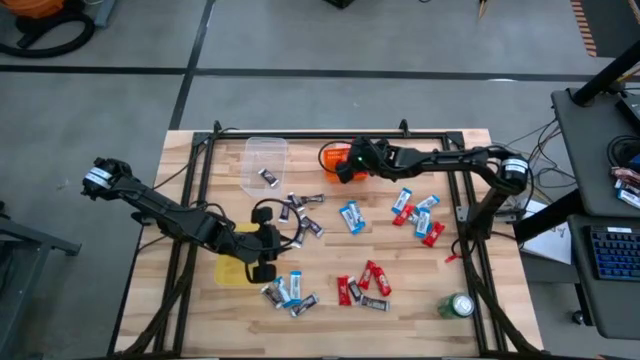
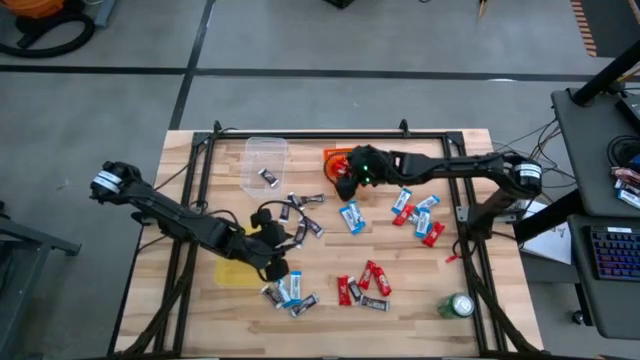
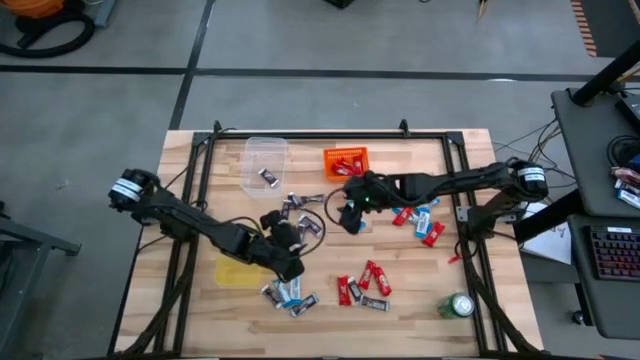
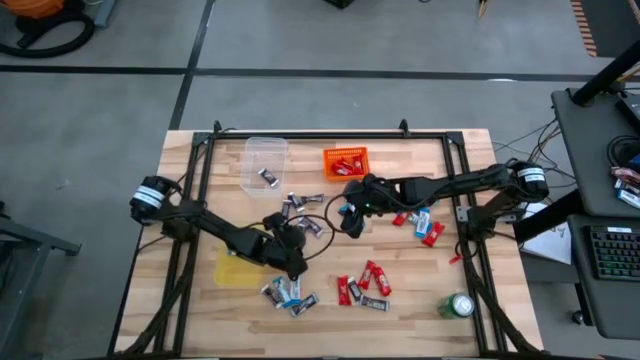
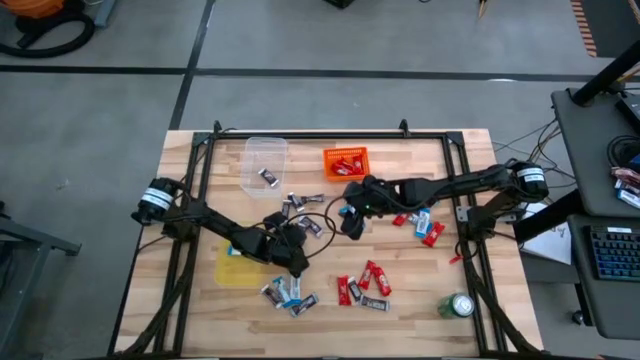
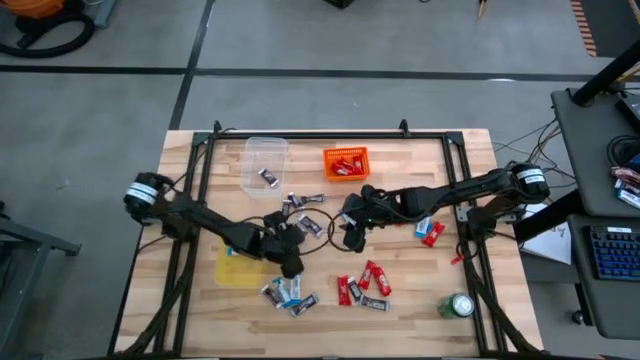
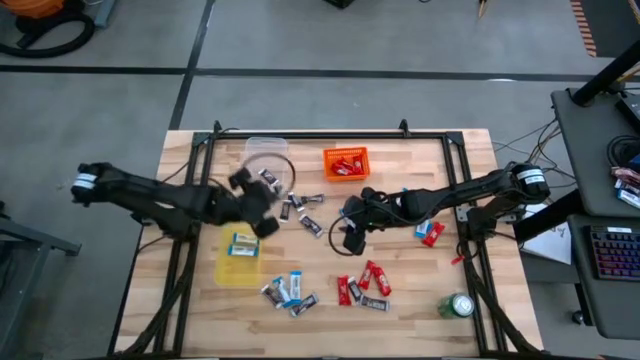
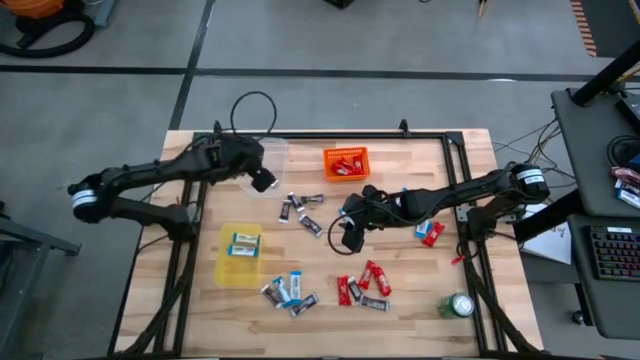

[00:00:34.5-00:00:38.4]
Task: Sort candy
Put the middle left brown candy into the transparent bin

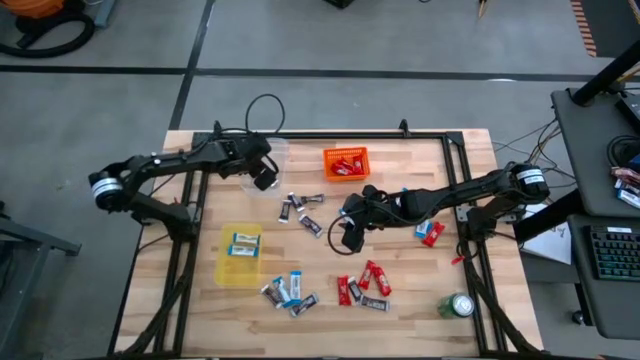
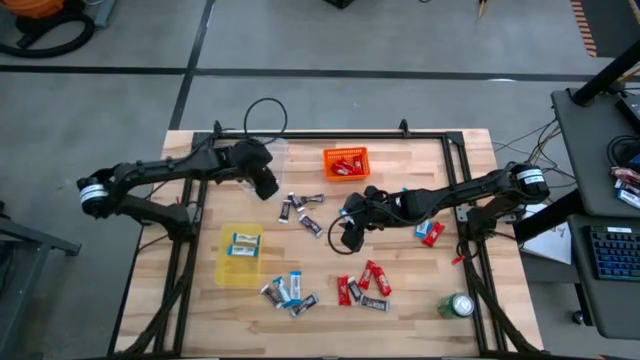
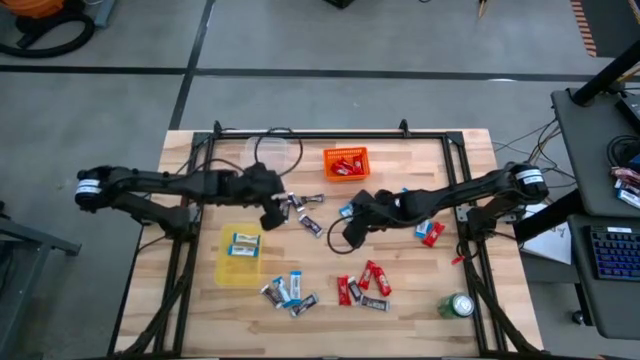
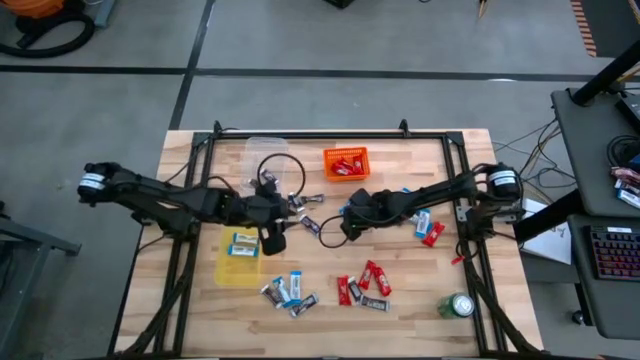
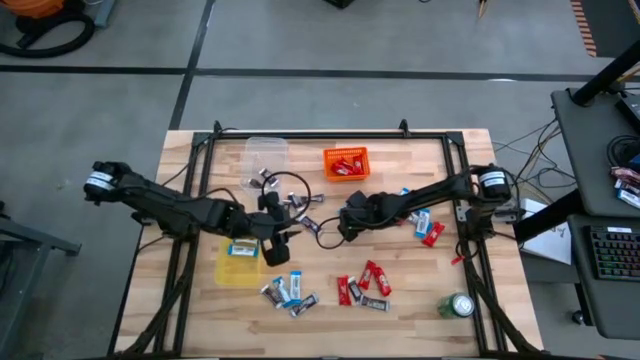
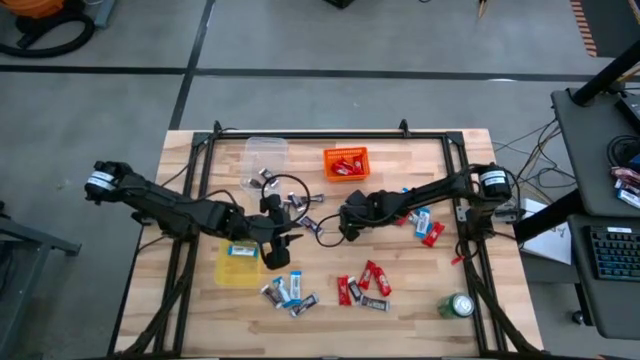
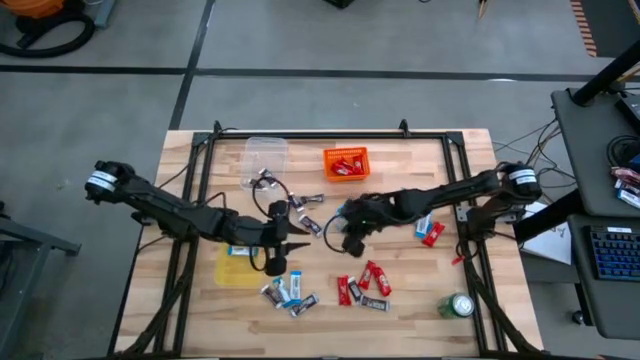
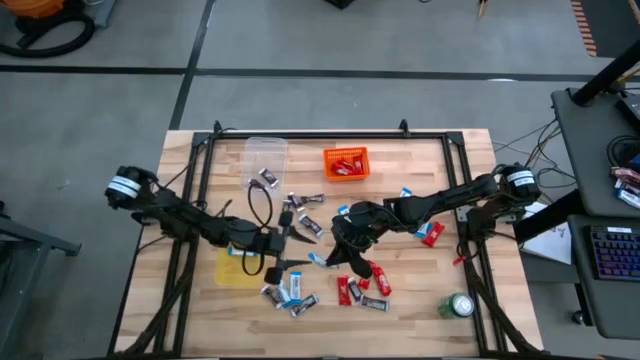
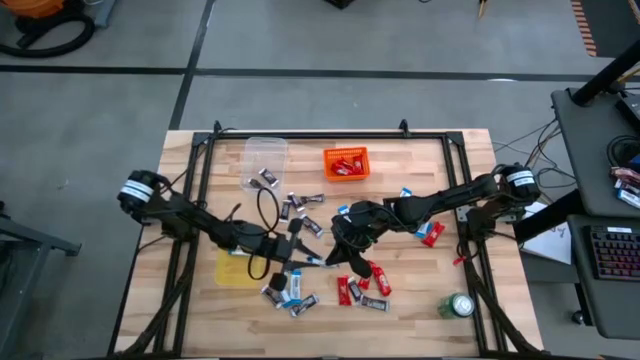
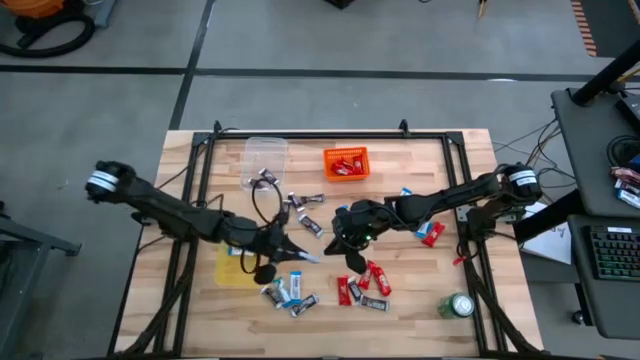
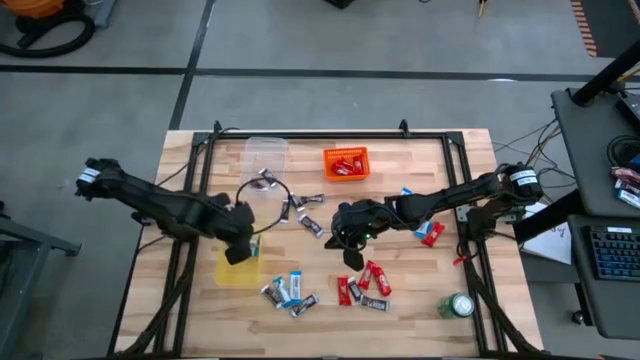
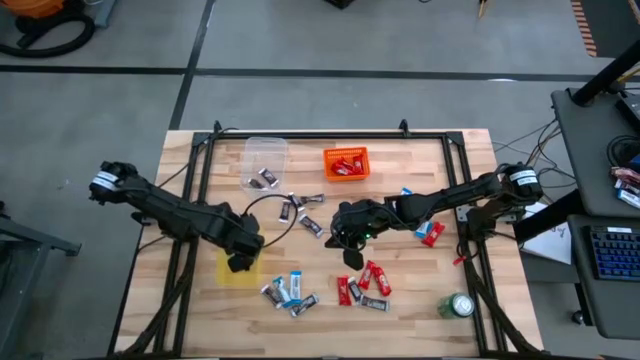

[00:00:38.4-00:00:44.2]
Put the center white candy into the yellow bin

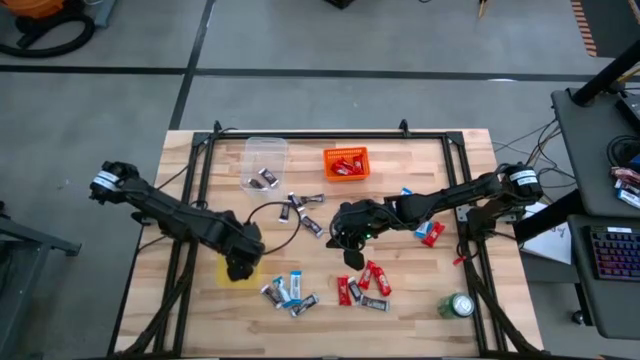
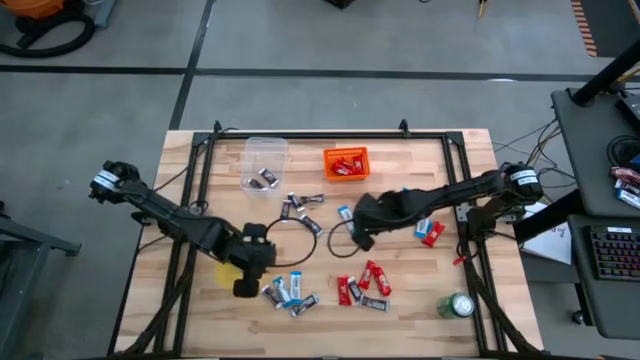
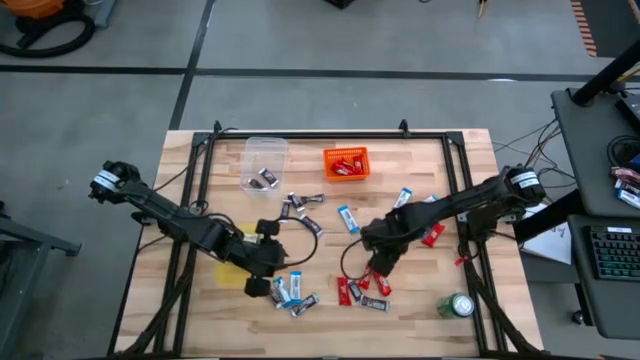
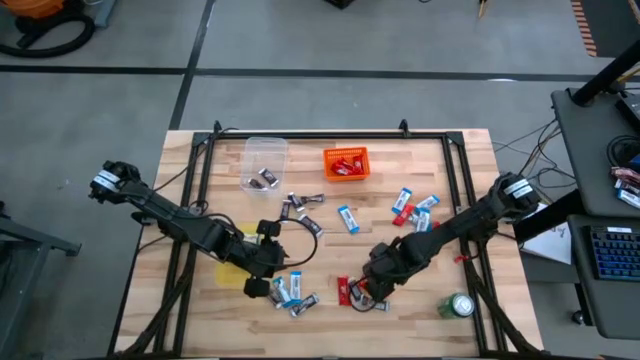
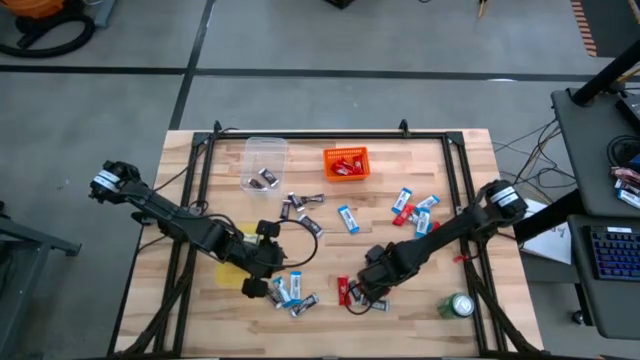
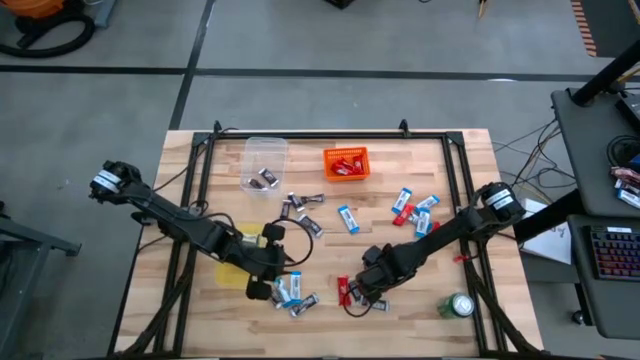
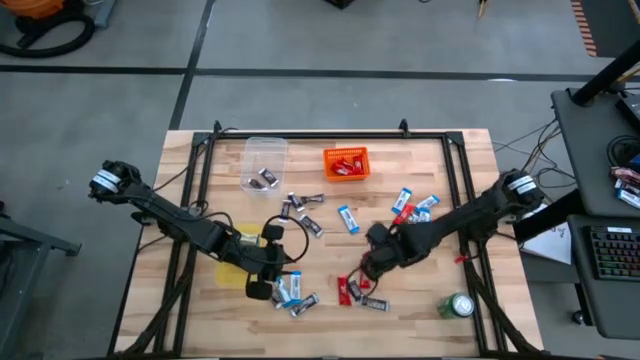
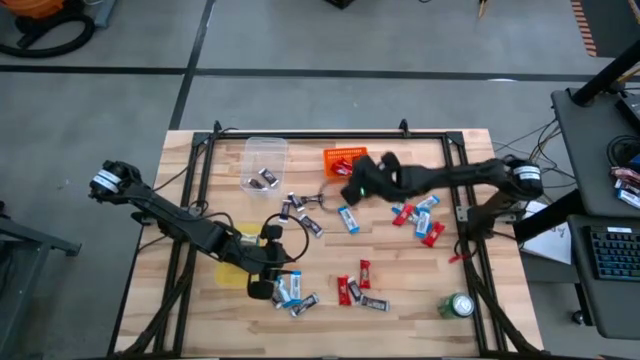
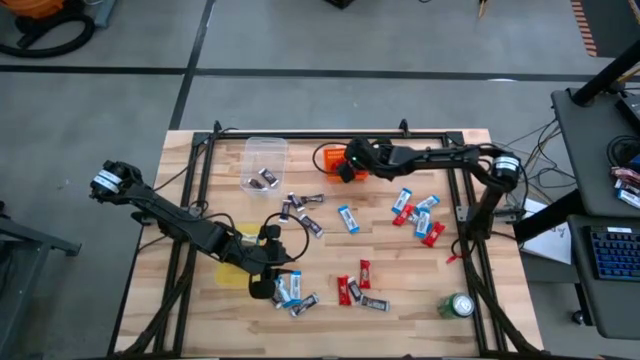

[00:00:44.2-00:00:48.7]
Put the bottom center red candy into the orange basket

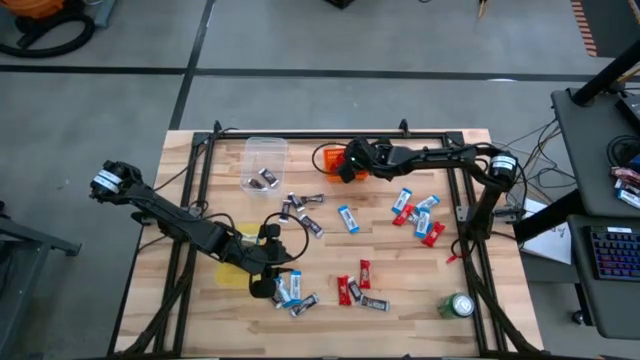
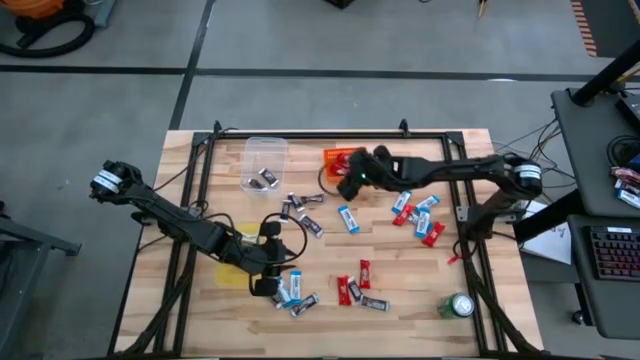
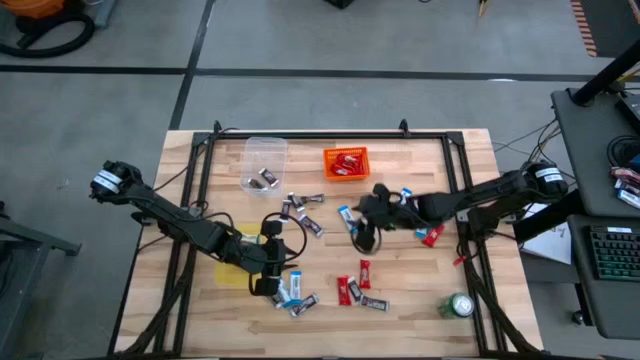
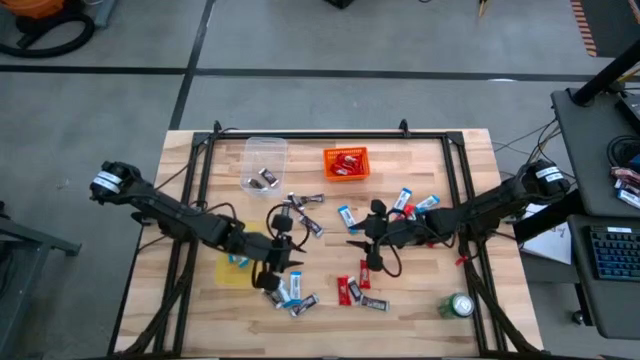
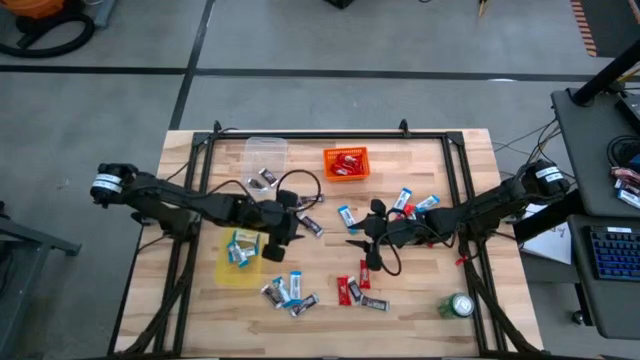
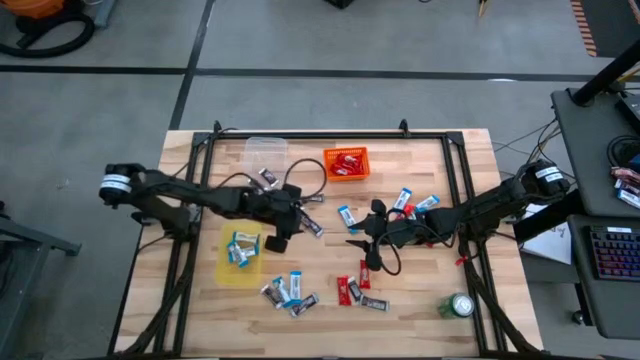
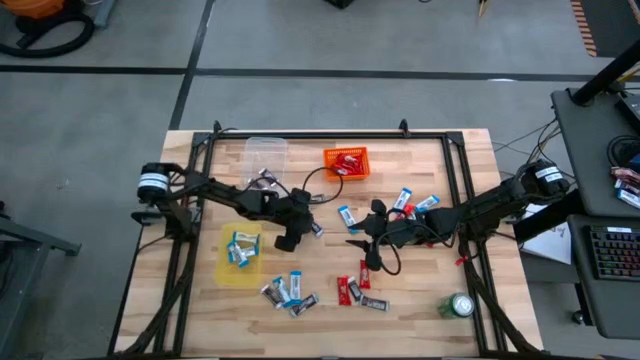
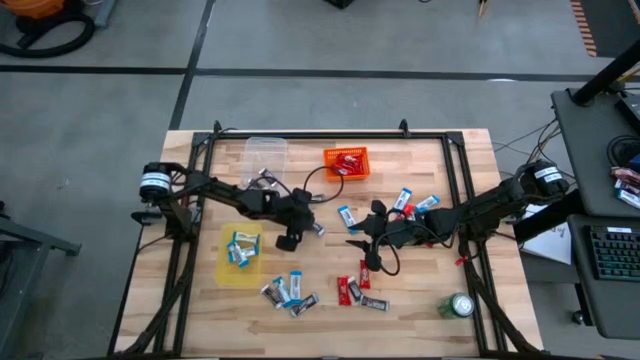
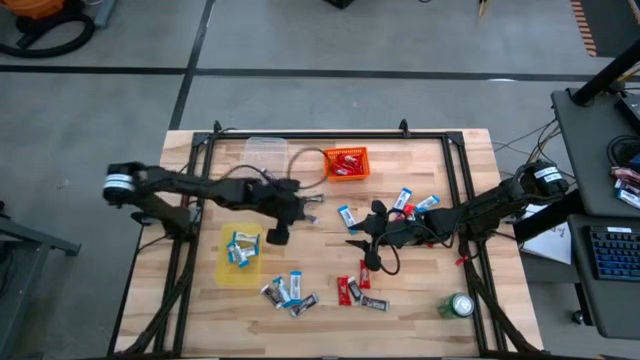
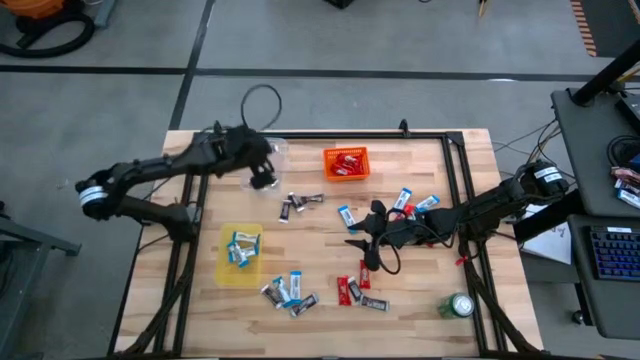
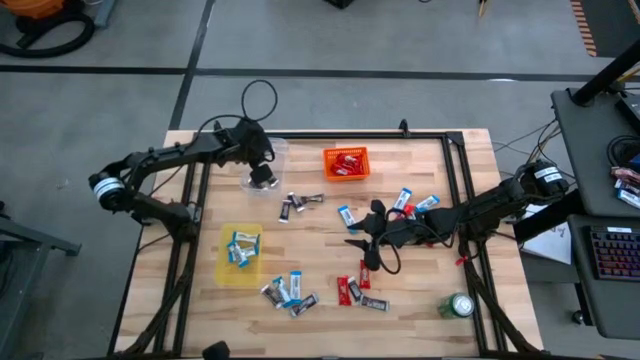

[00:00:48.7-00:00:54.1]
Put the middle left brown candy into the transparent bin
